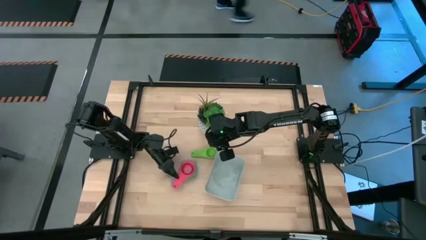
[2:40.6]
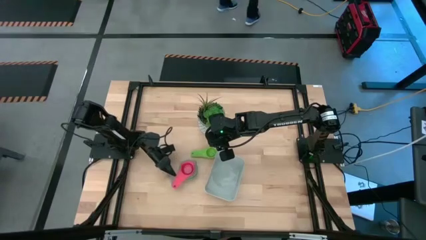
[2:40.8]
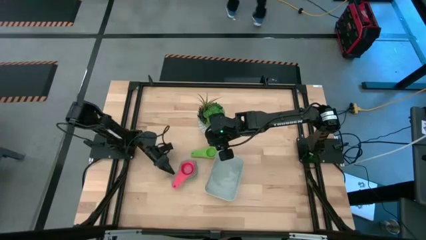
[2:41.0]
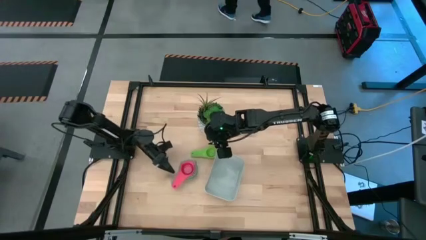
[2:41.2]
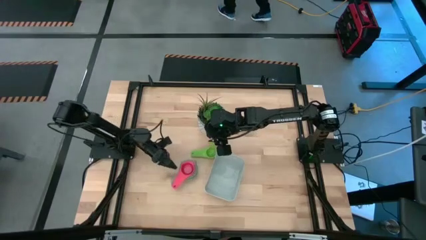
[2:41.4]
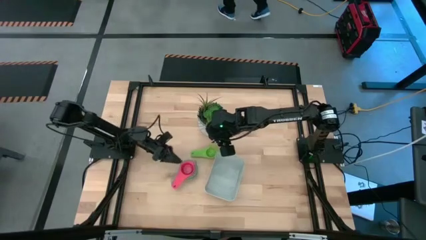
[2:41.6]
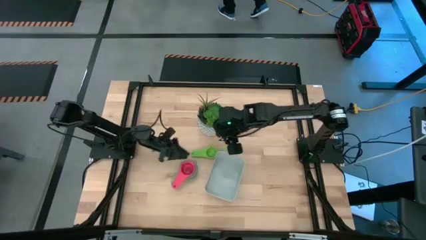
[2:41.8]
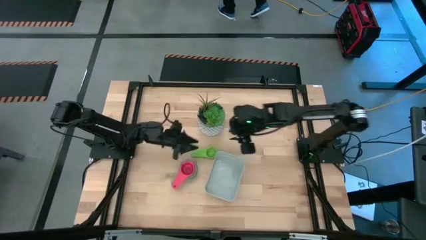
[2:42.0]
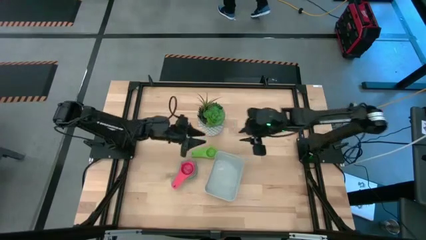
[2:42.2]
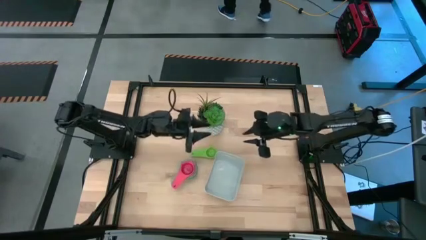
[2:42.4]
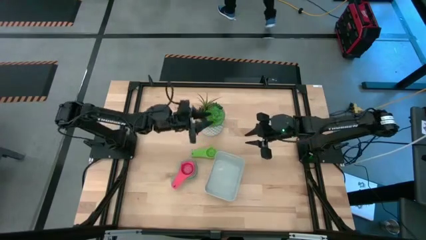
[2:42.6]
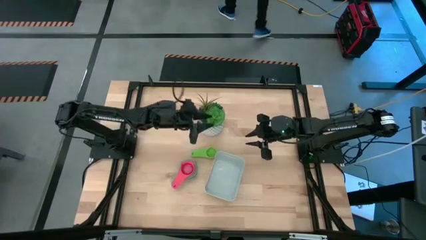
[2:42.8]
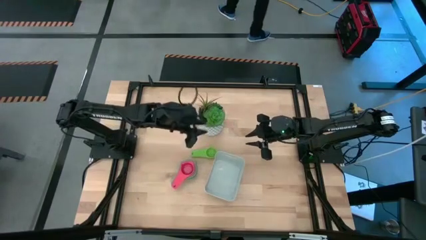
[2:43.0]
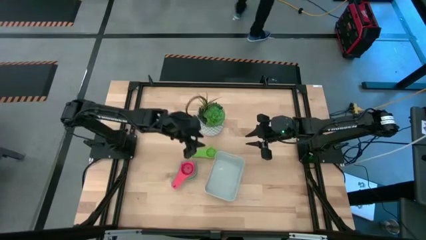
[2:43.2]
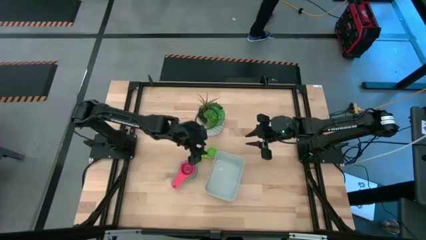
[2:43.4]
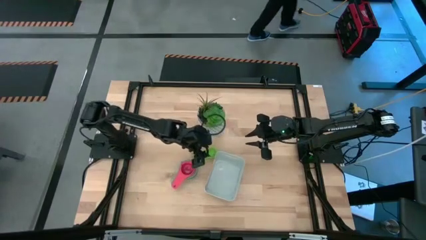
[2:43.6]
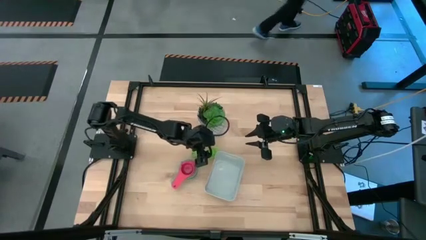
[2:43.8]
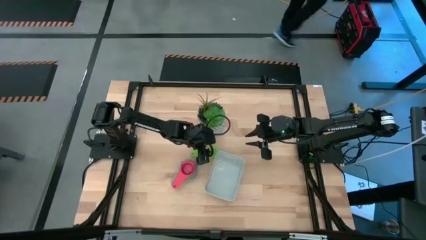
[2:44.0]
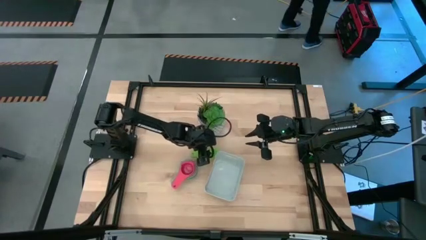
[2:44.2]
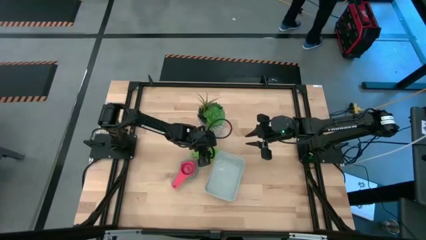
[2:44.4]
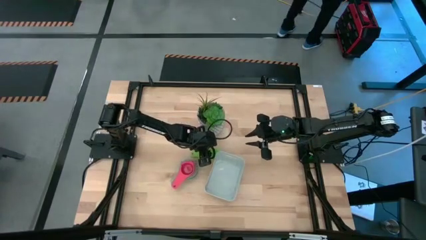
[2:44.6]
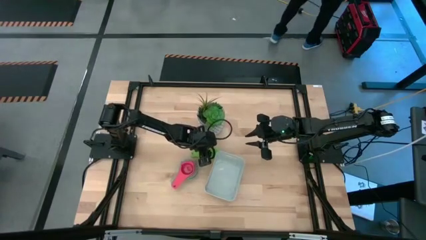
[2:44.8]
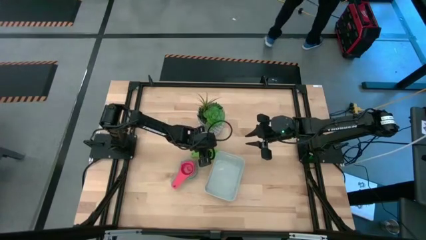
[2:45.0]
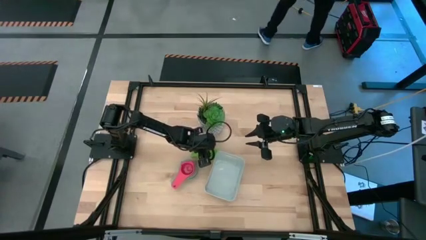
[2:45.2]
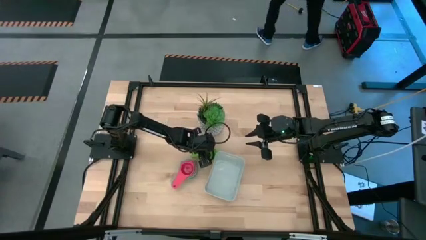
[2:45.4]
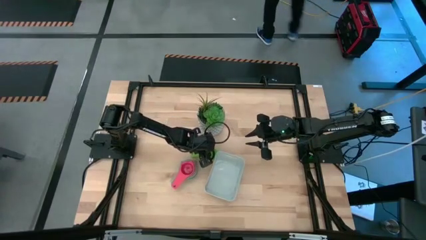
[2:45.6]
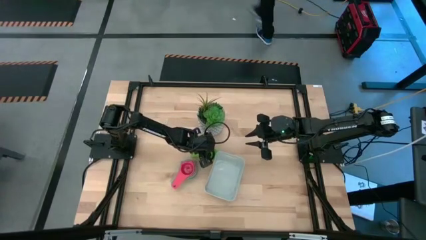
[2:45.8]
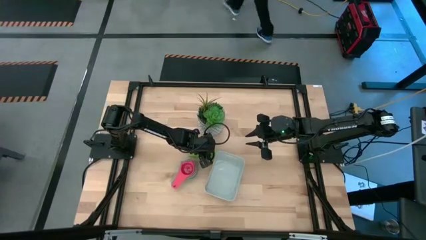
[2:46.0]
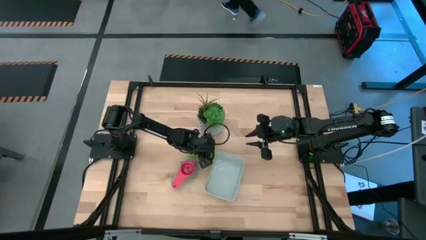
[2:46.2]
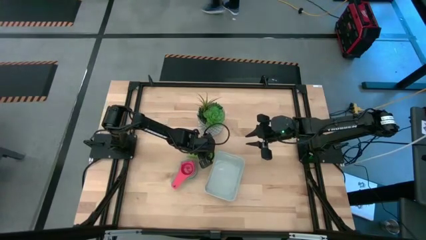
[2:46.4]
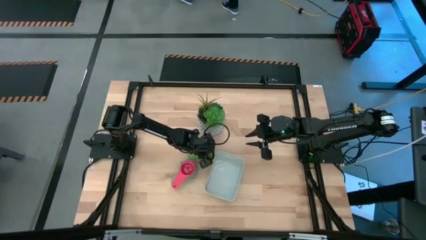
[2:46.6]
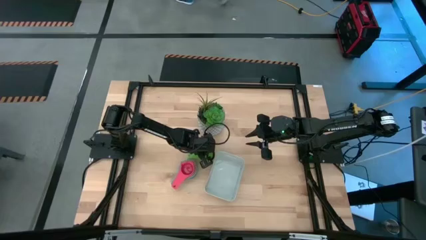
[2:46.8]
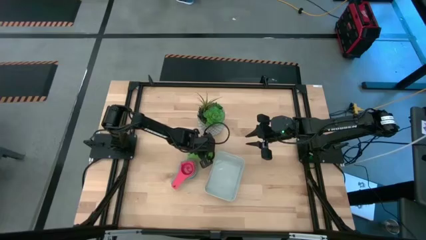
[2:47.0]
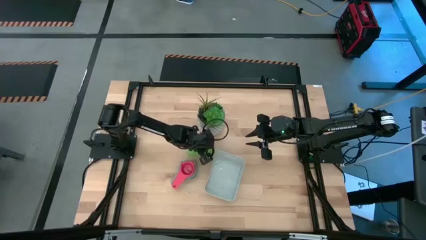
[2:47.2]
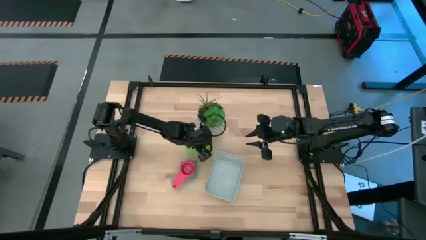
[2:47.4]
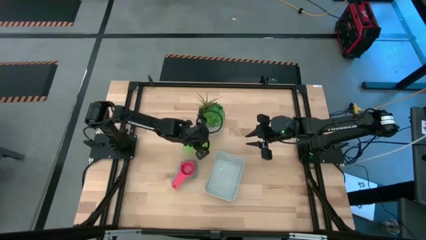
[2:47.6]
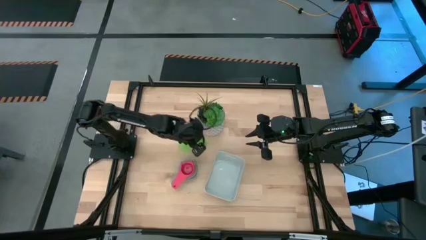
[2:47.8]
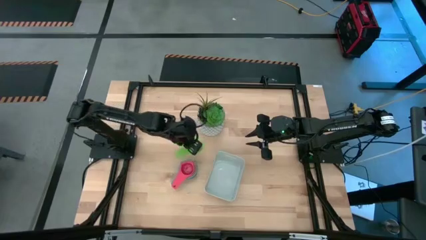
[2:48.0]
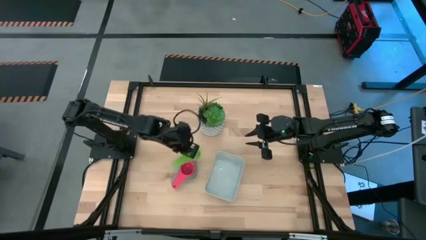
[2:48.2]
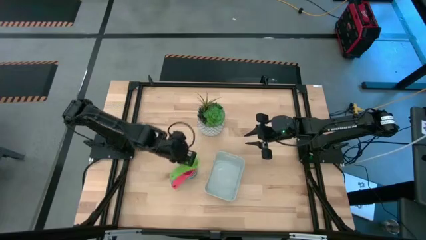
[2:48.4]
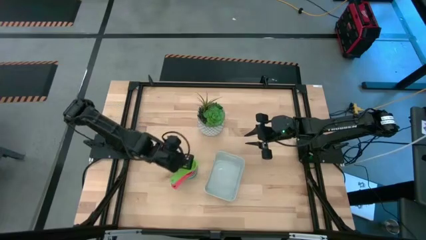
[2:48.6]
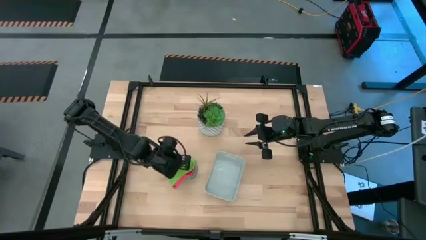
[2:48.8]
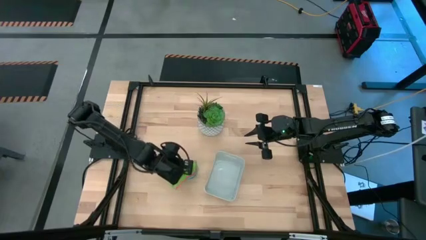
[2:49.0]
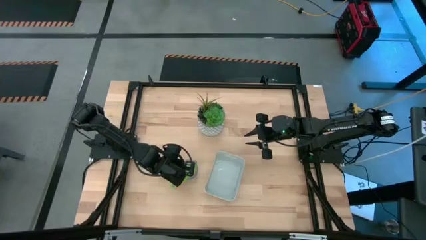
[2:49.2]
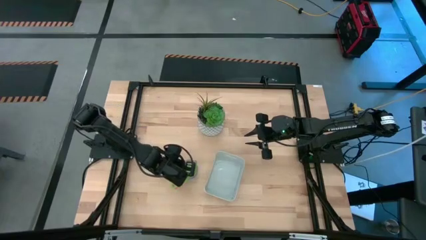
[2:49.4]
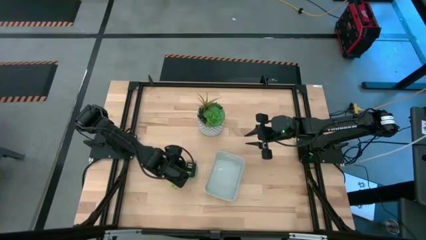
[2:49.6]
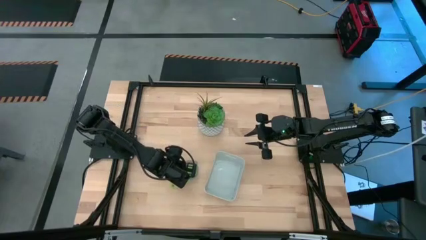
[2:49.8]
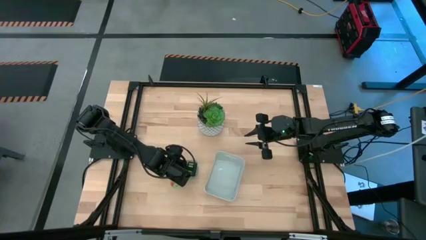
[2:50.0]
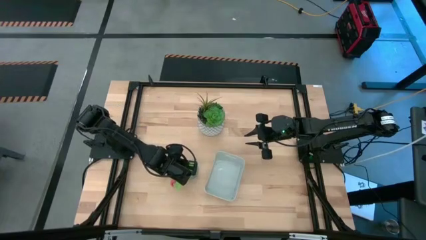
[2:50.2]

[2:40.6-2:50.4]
Task: Nest measuring cups in basket
Stack the green measuring cup on top of the pink measuring cup

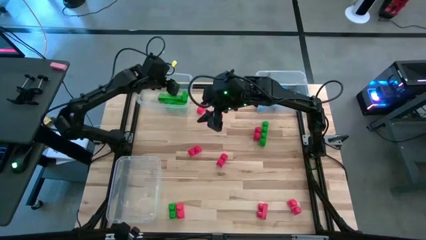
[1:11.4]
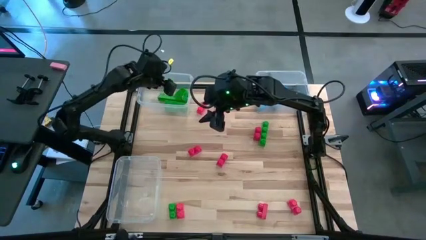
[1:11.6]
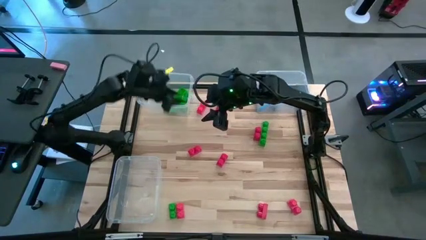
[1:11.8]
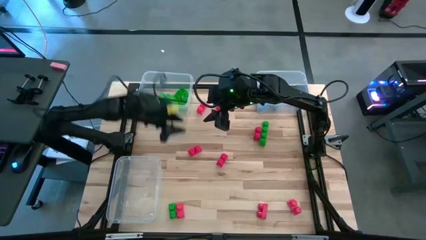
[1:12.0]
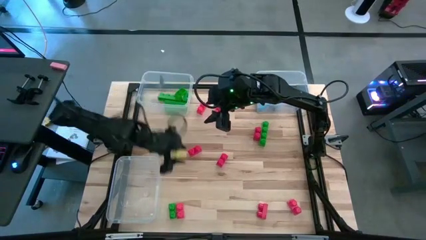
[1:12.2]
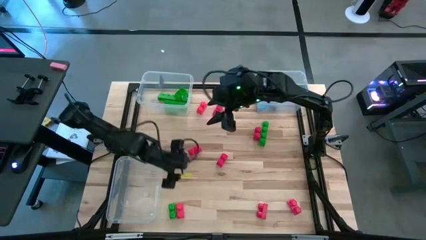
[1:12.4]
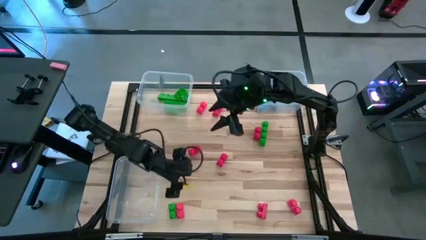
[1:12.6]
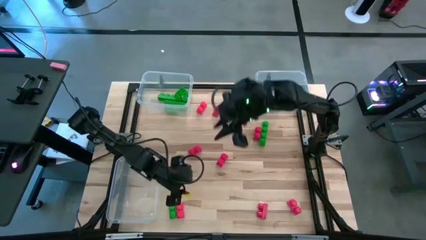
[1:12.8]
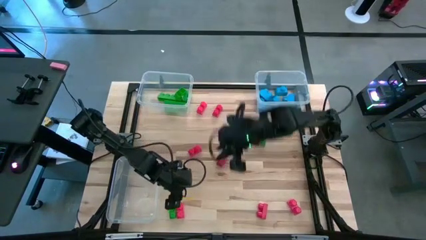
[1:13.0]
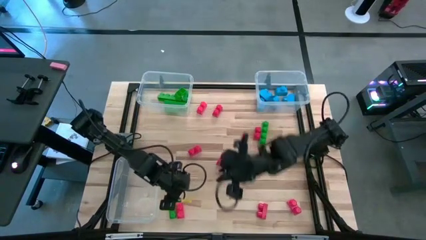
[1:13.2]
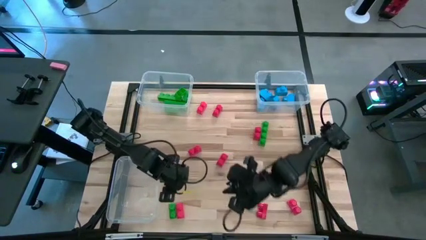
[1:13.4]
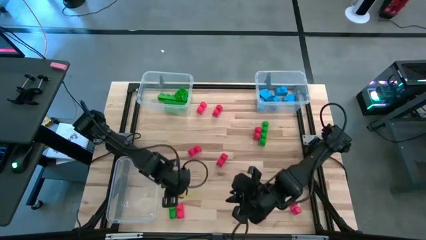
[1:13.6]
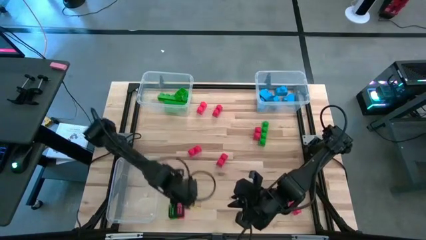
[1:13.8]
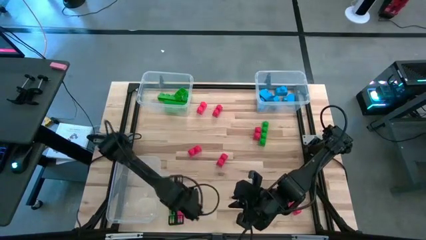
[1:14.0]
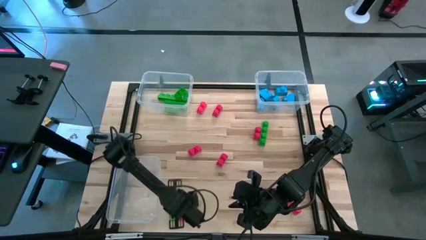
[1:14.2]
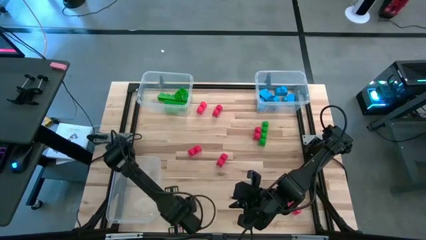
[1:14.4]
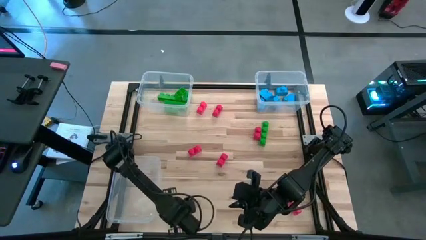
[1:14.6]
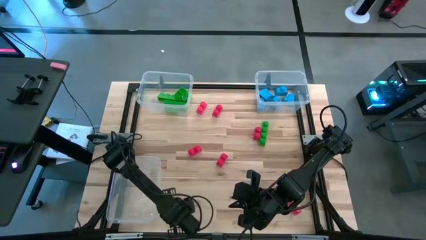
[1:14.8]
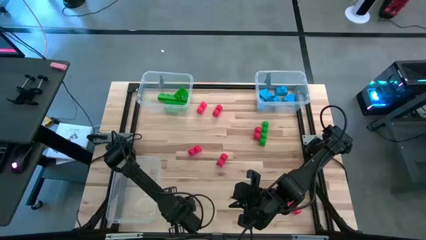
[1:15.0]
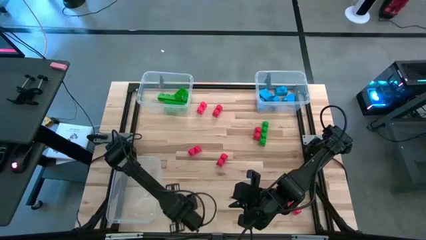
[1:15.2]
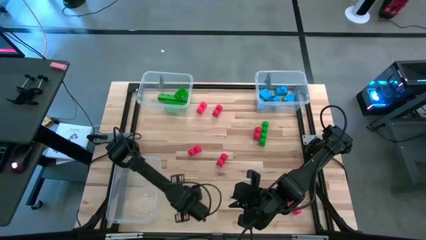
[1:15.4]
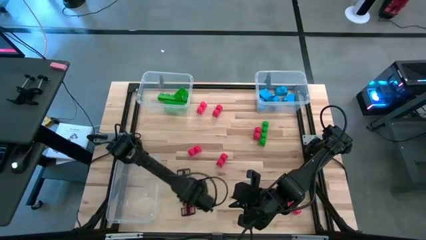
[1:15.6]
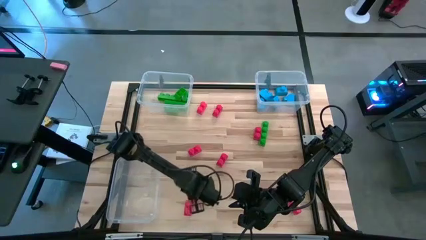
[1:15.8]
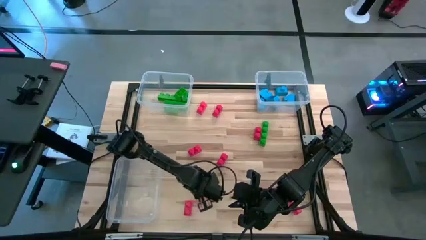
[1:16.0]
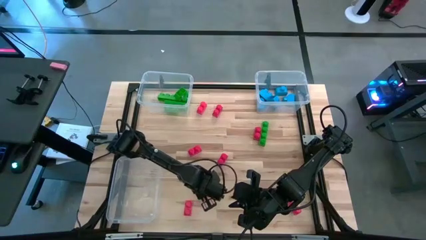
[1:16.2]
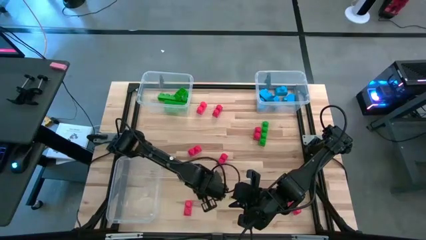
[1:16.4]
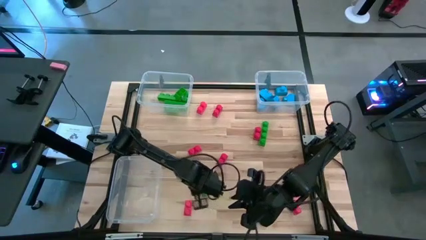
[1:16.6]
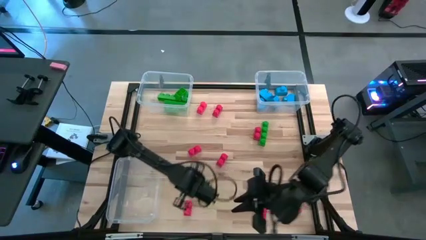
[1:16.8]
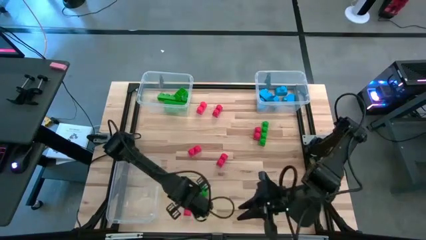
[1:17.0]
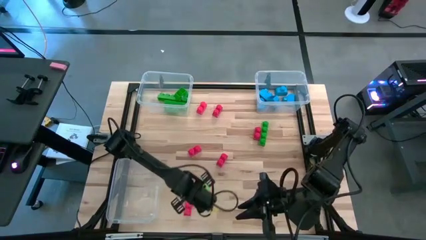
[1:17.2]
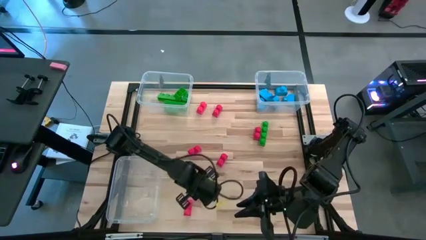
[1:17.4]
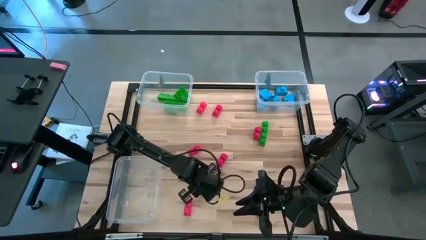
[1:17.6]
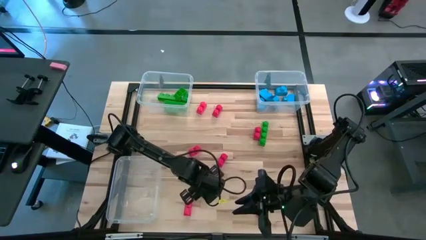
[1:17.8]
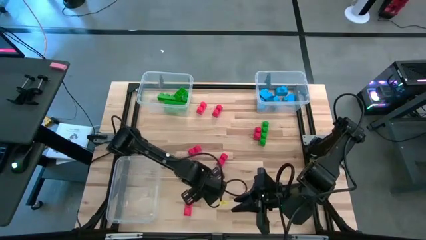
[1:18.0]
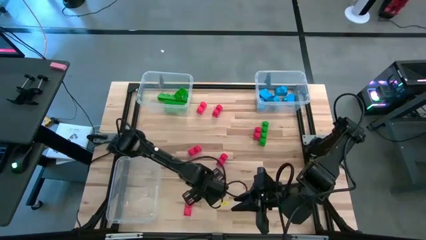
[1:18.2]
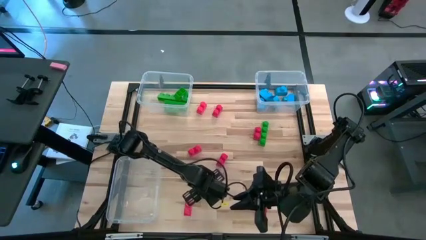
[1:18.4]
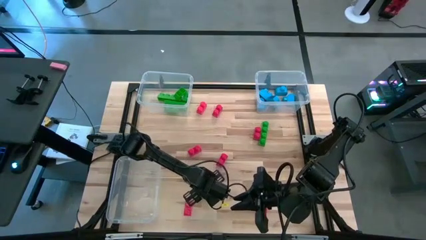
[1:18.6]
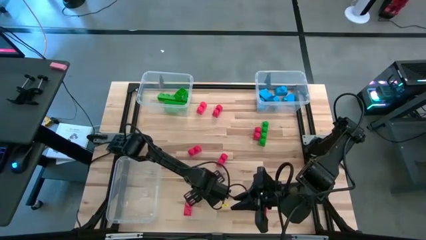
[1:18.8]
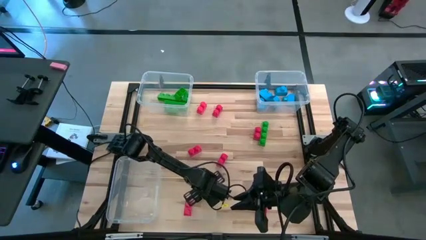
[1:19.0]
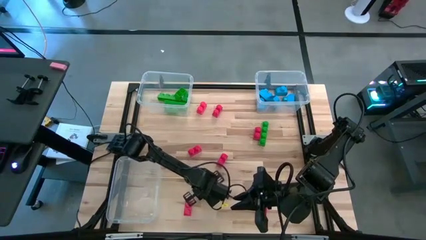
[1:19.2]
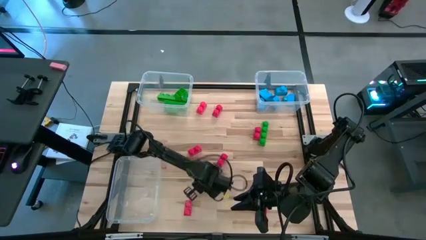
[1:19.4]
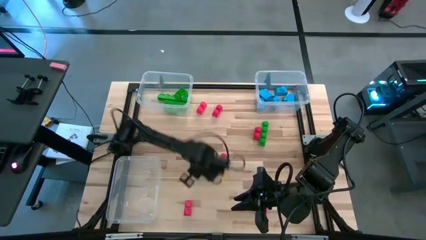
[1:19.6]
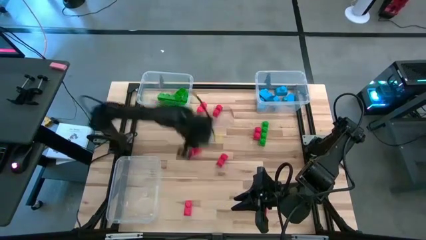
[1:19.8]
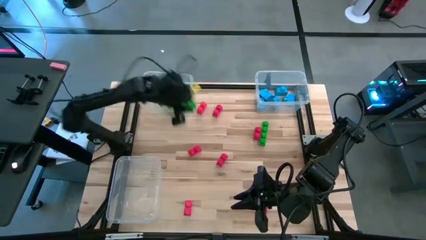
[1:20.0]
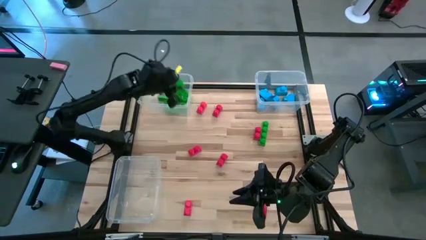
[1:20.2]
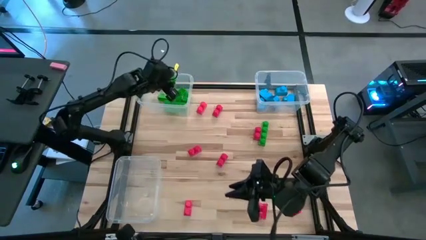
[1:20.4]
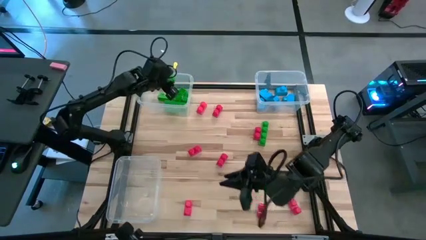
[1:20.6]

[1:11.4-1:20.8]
Task: Sort blocks
Put the green game piece into the top left transparent bin
